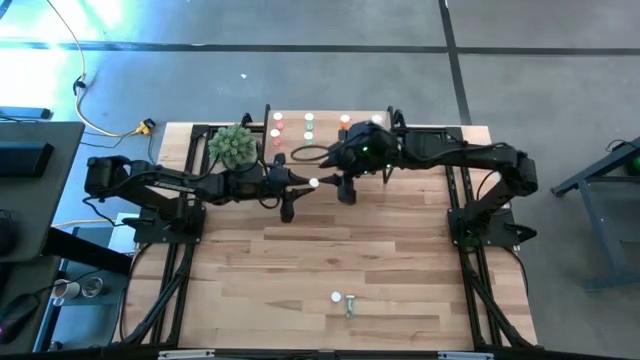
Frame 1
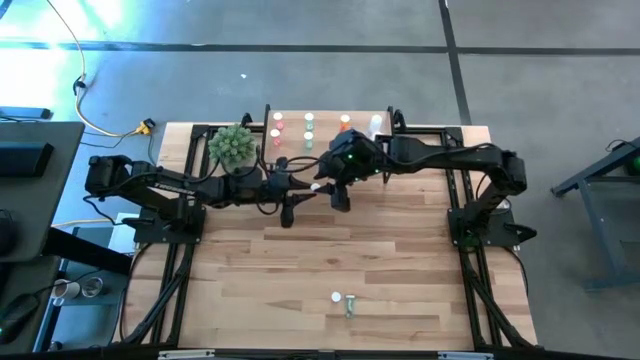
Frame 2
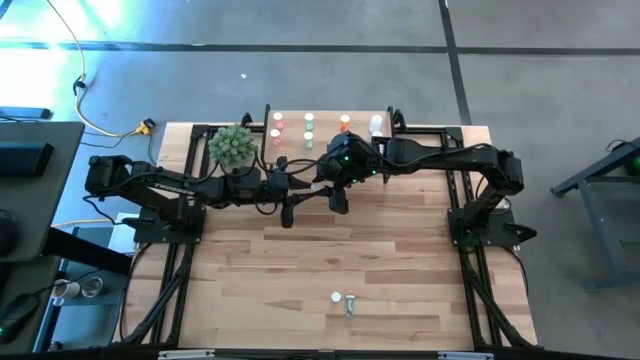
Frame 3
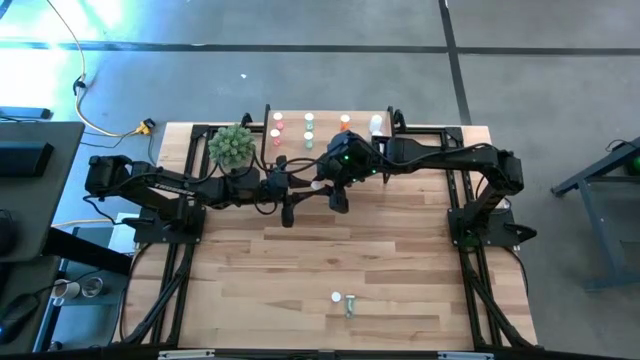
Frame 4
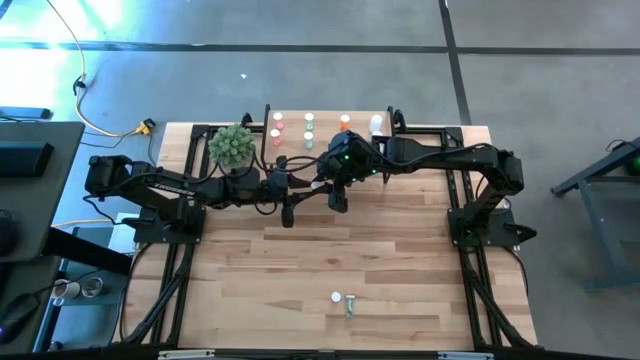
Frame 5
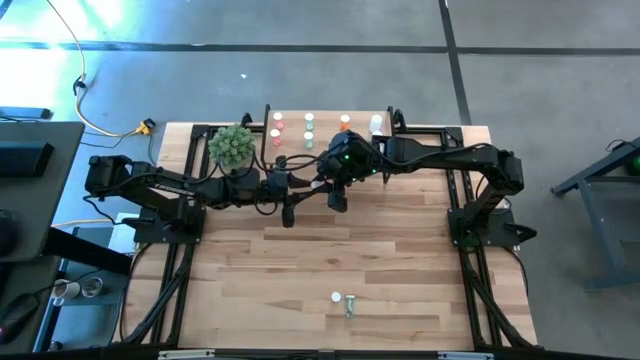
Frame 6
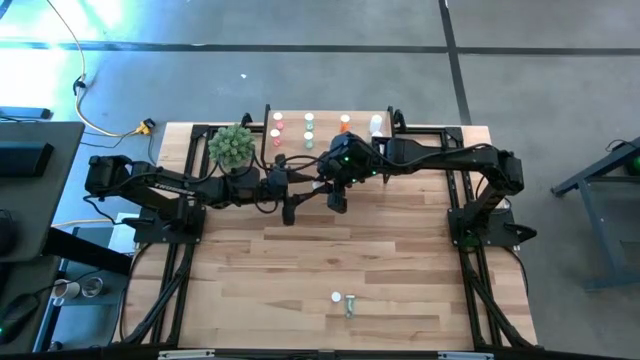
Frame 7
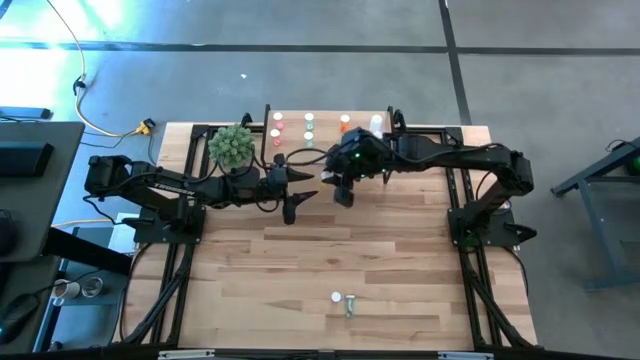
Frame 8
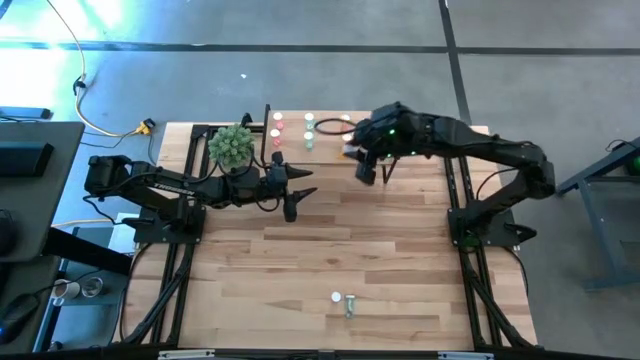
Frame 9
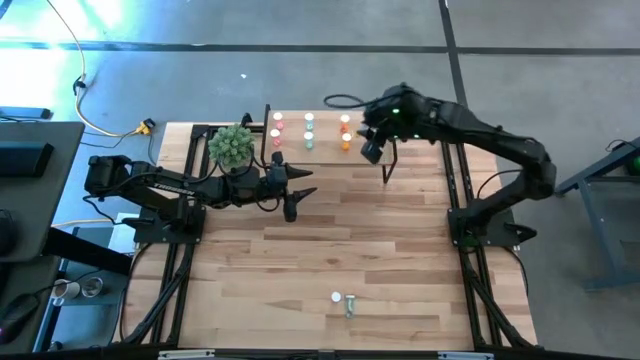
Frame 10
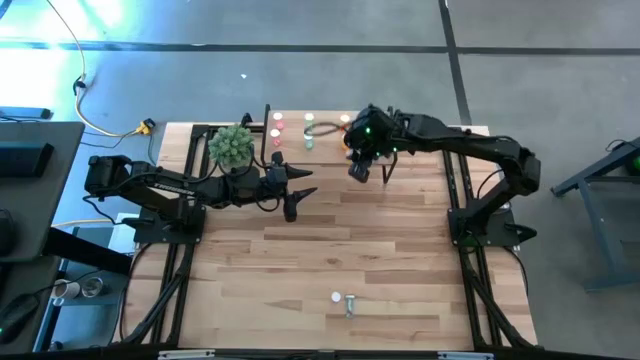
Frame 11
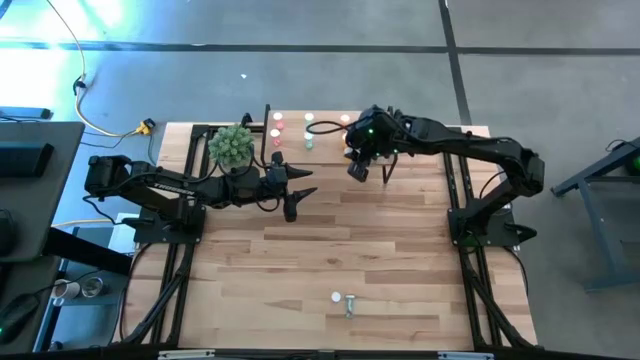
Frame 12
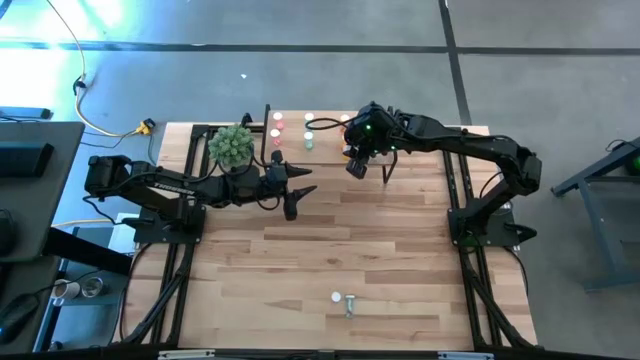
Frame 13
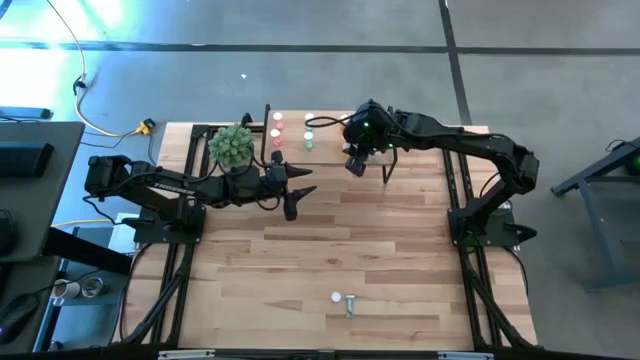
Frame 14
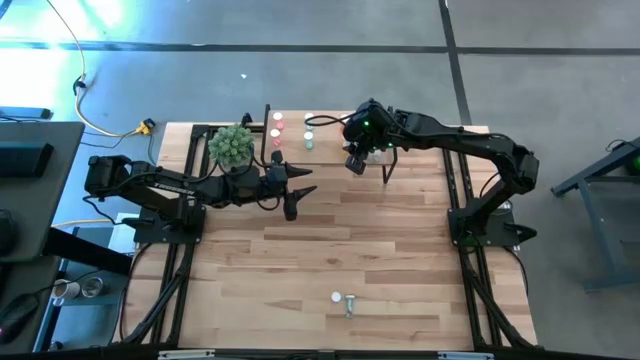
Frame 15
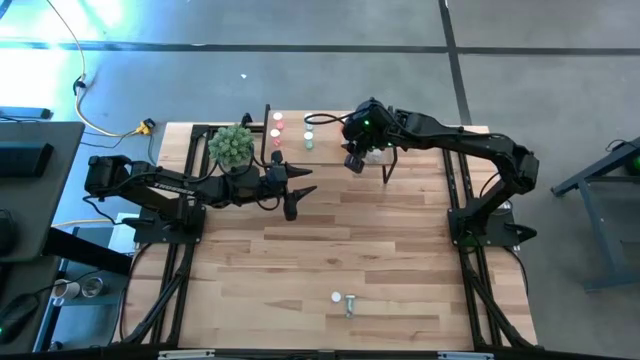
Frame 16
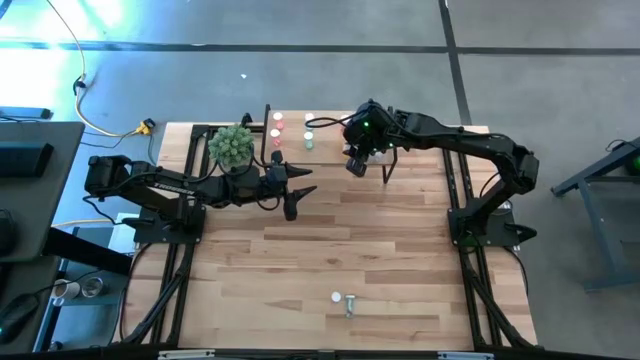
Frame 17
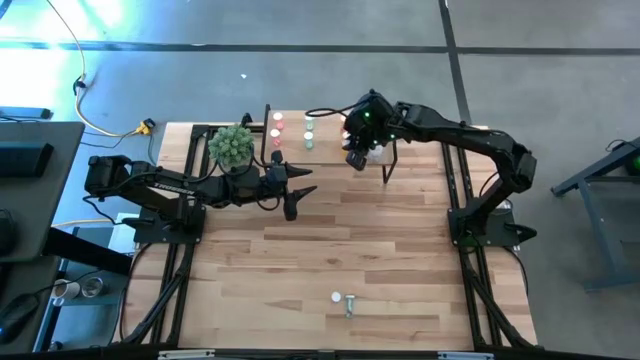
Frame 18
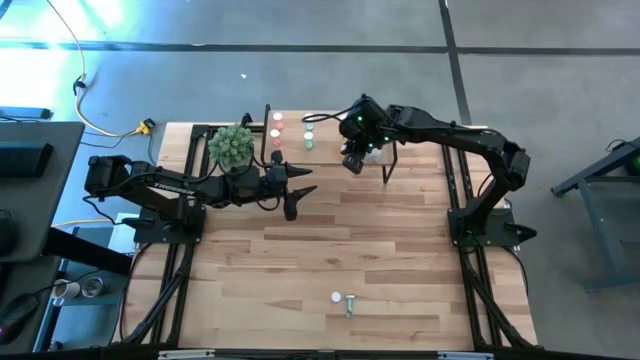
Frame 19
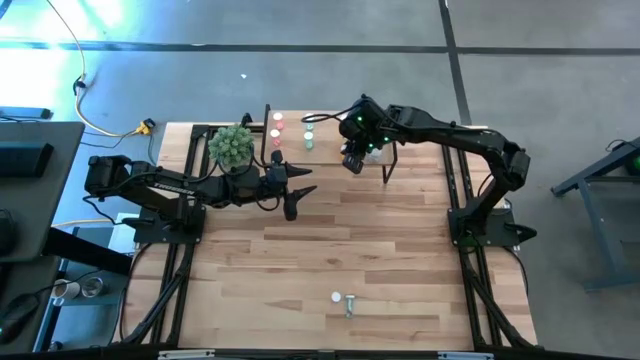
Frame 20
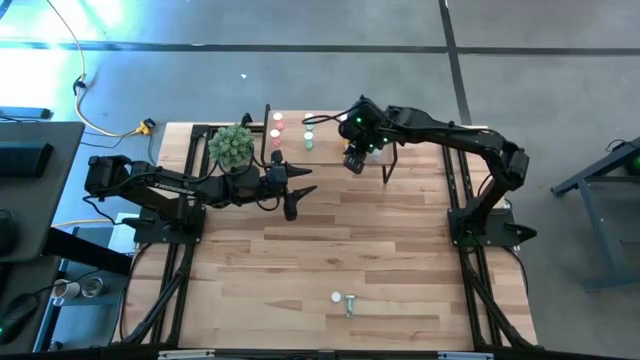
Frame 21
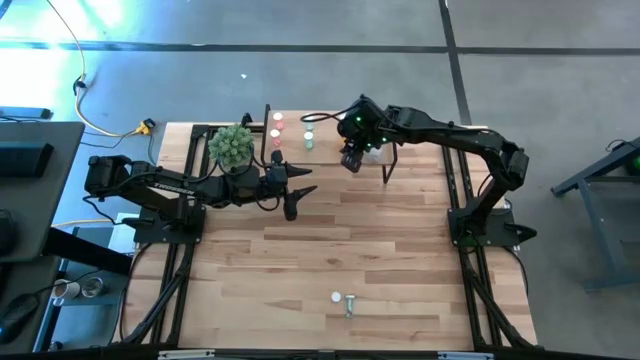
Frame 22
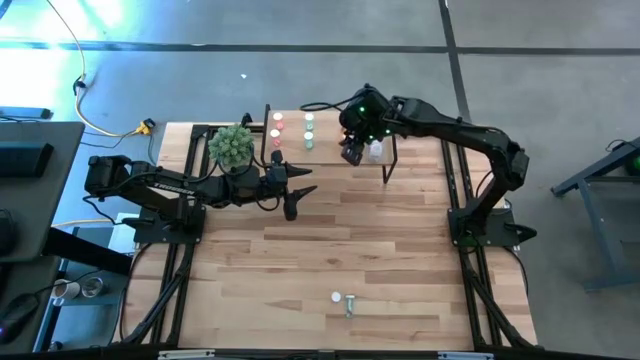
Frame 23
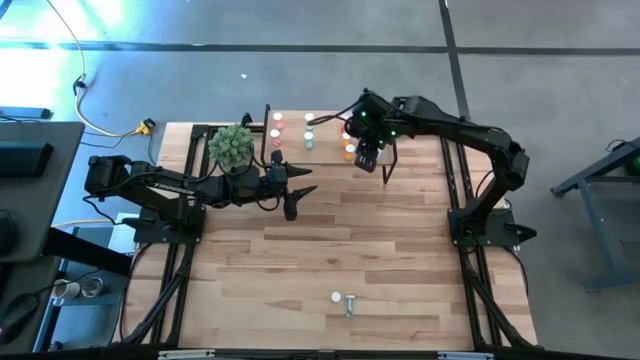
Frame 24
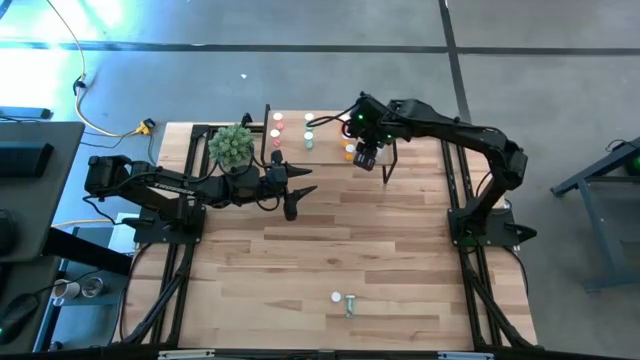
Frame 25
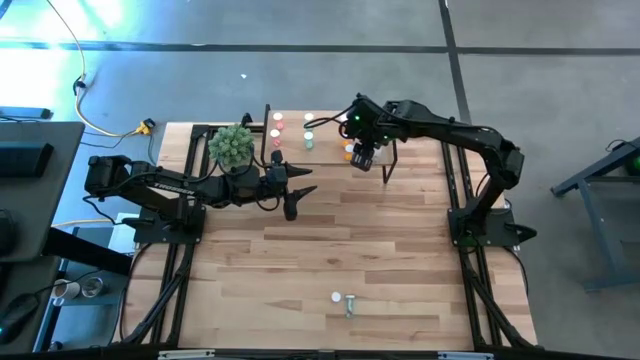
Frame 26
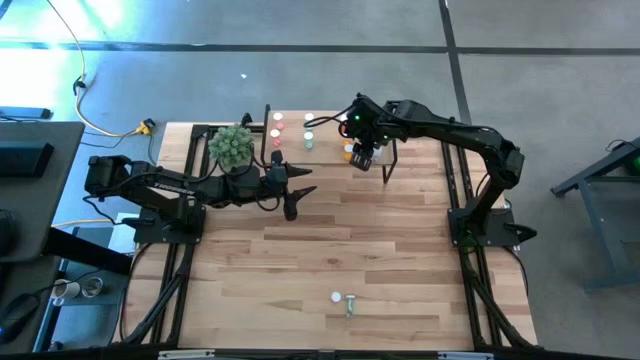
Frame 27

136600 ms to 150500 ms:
Task: Pick and place medicine bottles onto shelf by color
Put the orange pill bottle on the shelf aligned with the other orange pill bottles

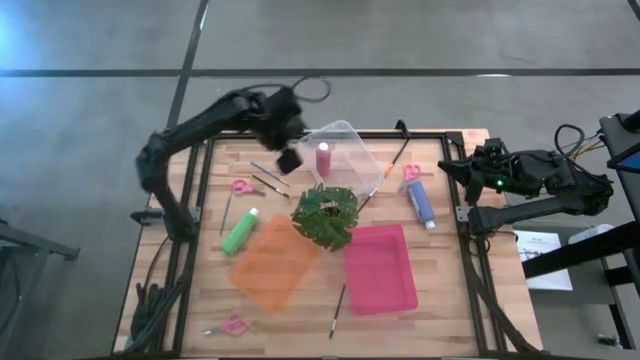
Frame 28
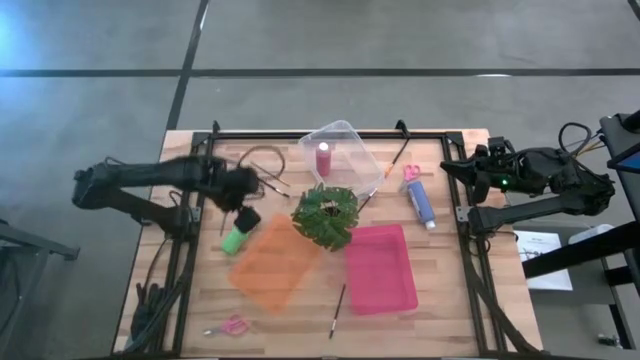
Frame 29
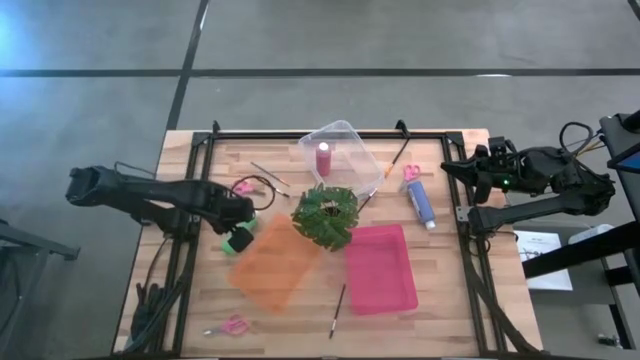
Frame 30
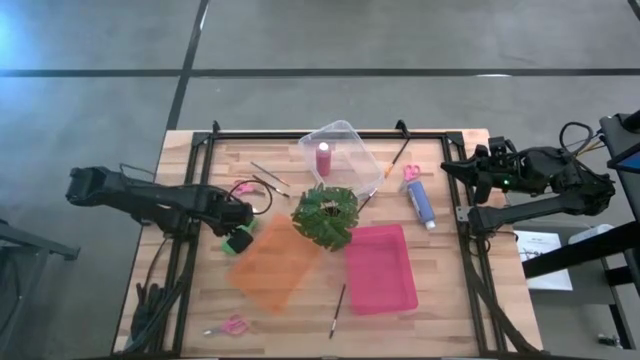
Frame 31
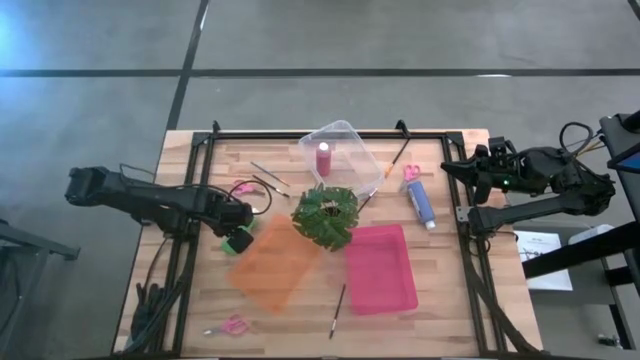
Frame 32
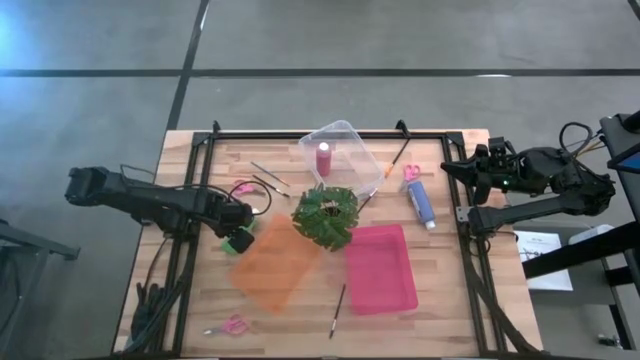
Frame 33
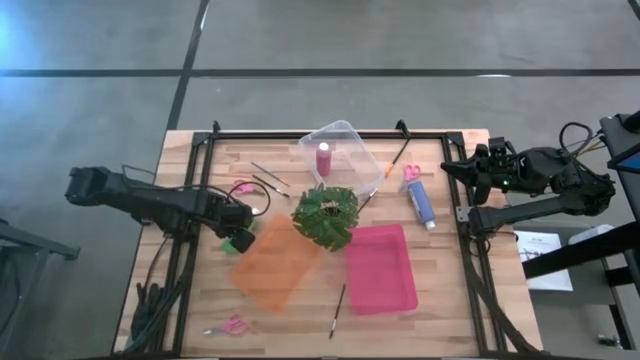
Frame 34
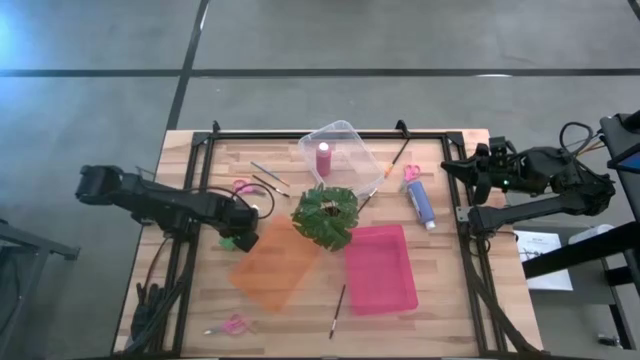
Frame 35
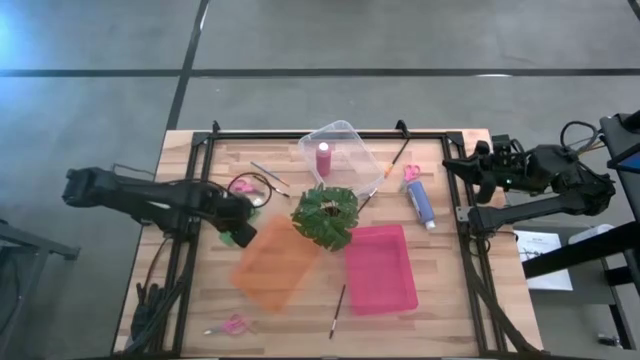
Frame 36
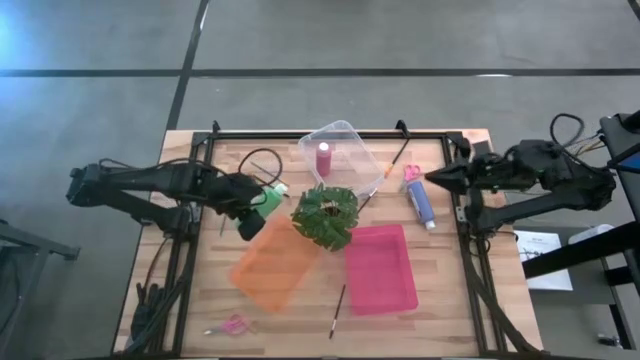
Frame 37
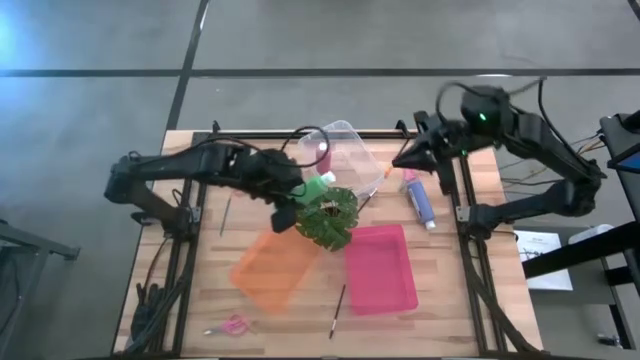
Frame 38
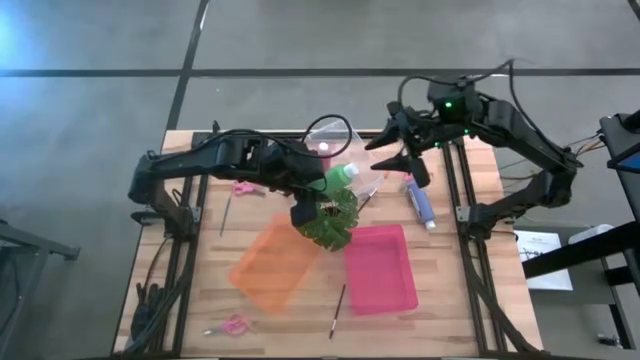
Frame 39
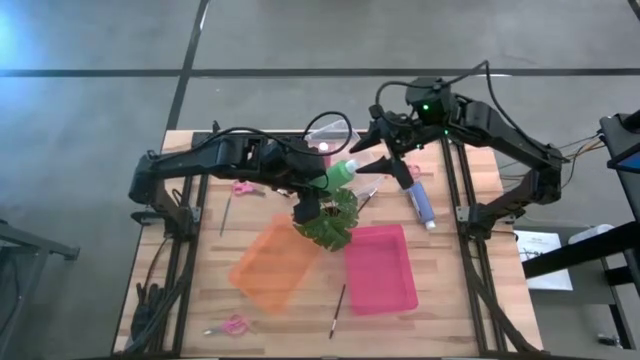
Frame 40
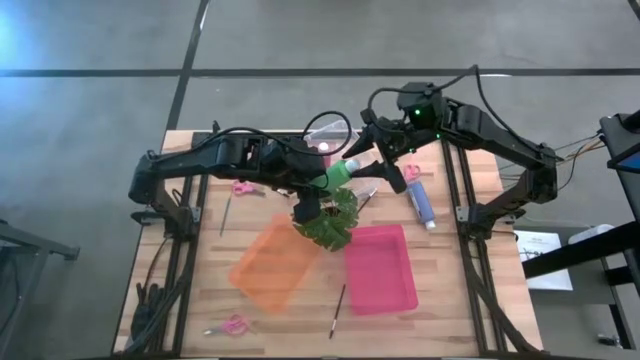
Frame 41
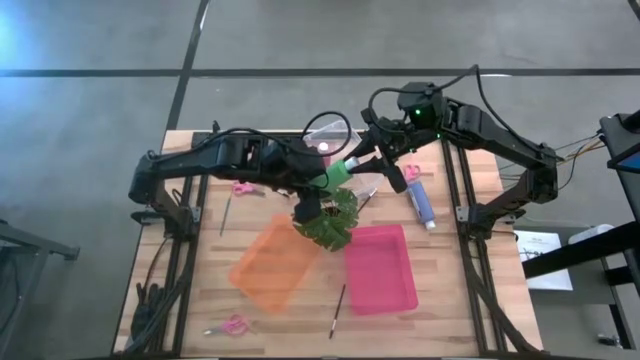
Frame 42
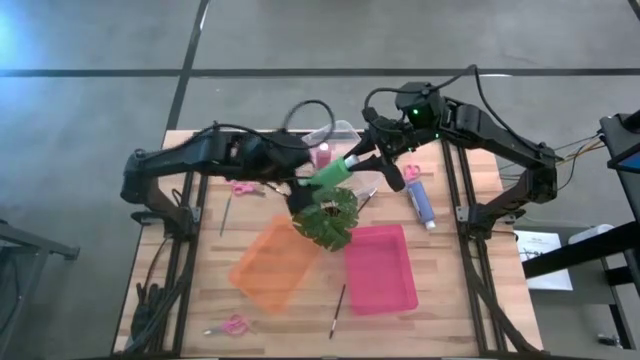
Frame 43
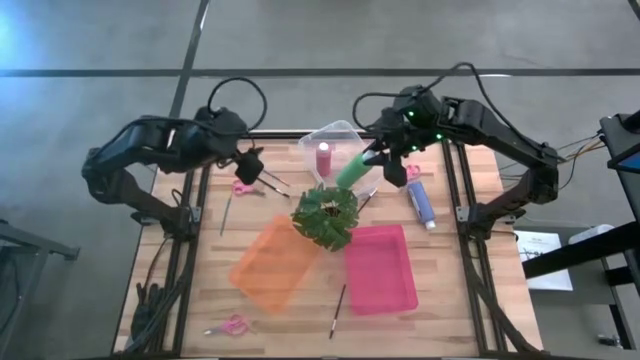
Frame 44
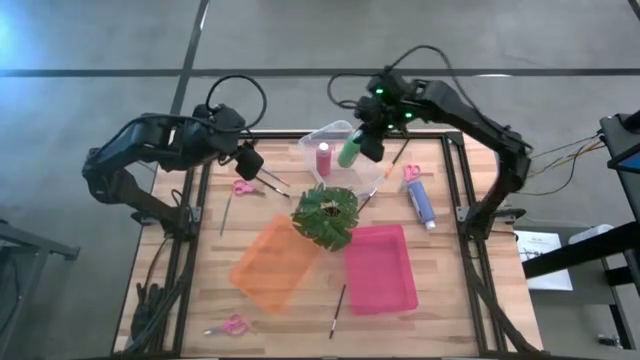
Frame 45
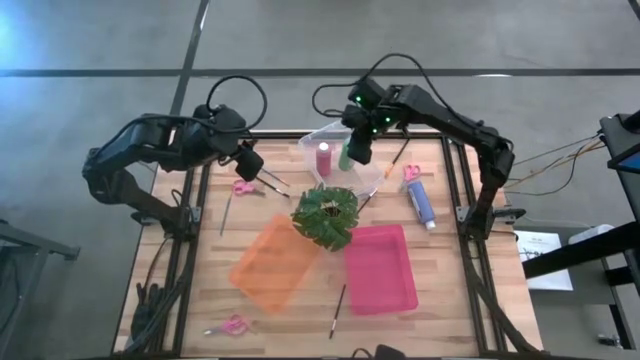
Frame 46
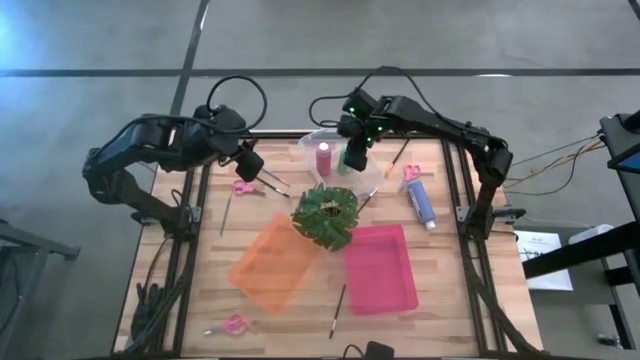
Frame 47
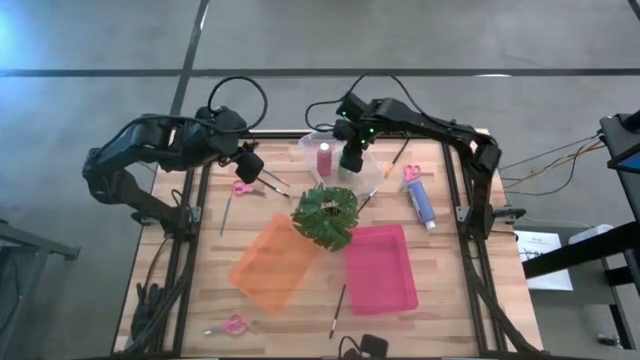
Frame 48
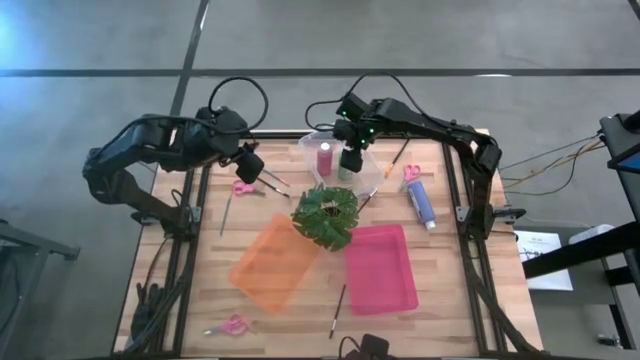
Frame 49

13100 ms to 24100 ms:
Task: Pick & Place Paint Supplies
Put the green acrylic craft paint bottle into the transparent bin
